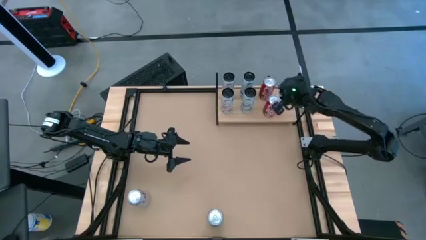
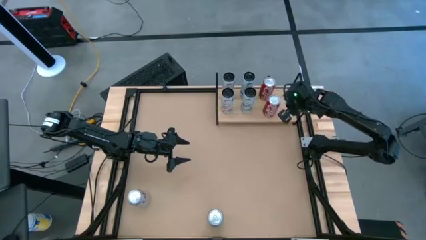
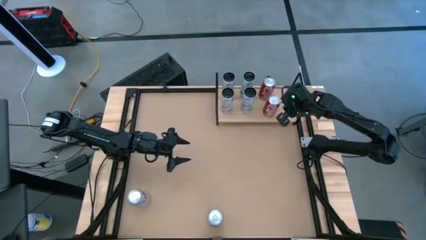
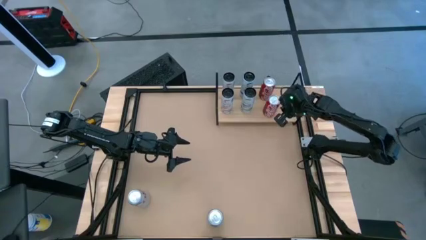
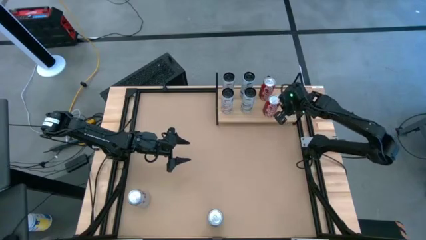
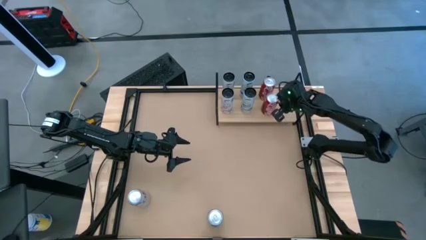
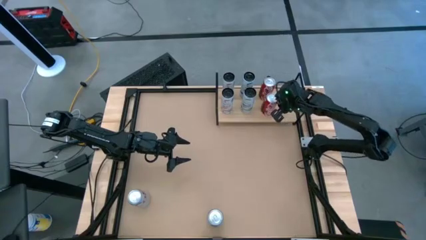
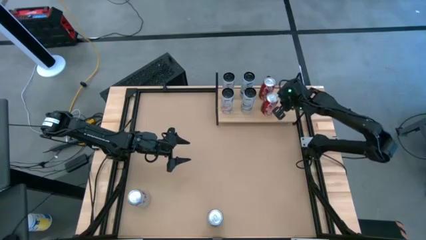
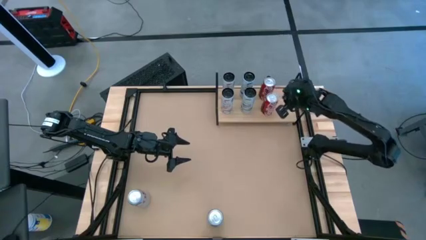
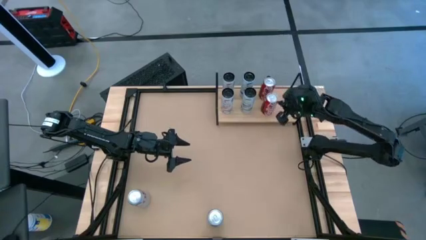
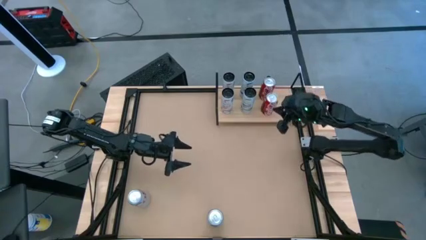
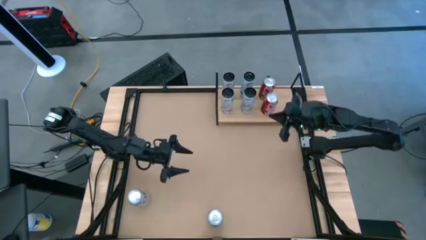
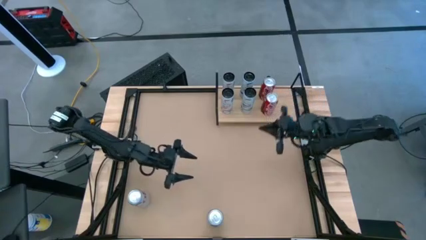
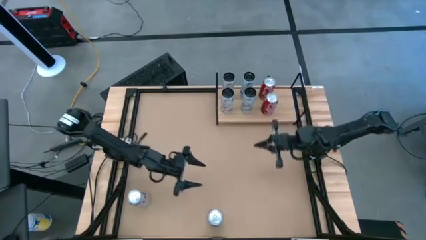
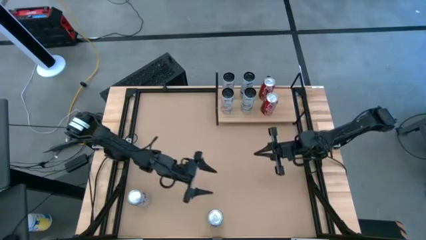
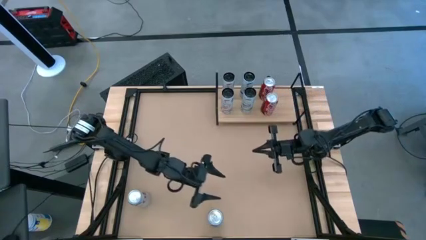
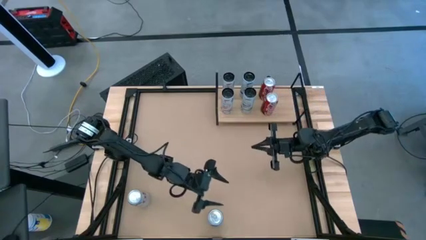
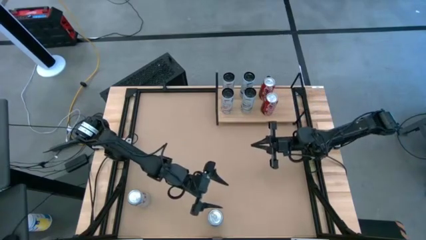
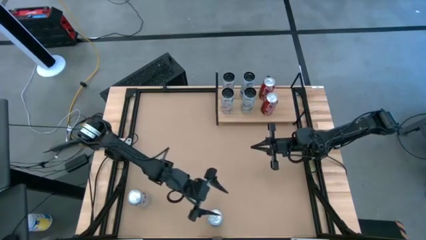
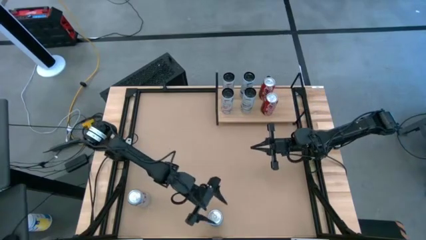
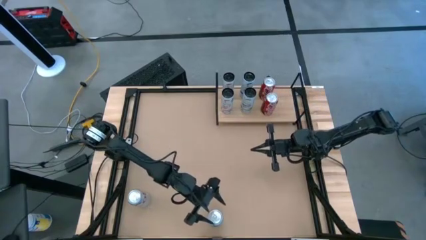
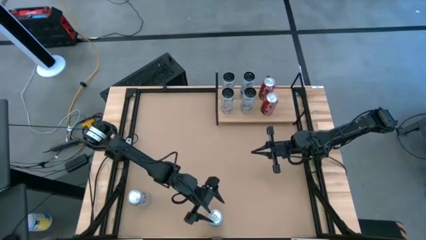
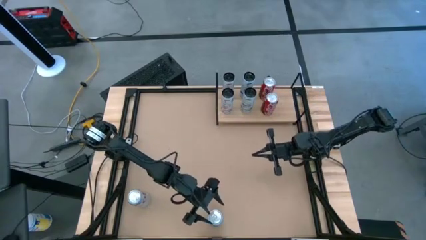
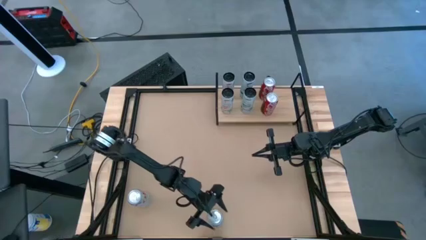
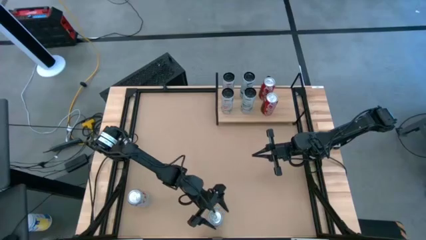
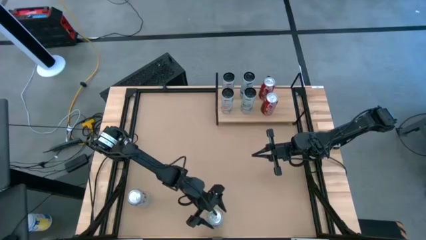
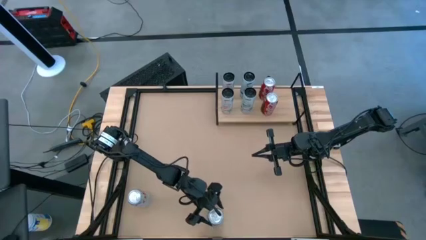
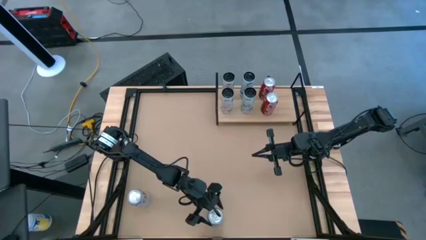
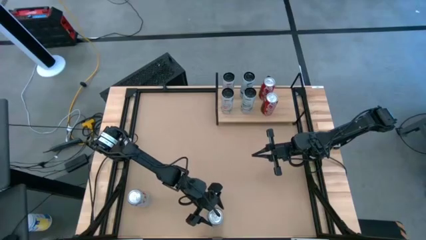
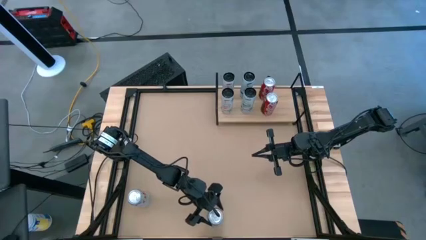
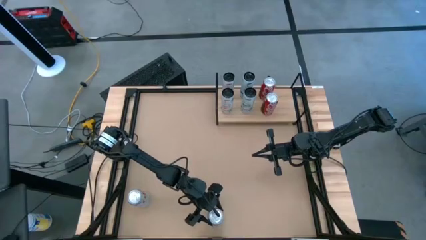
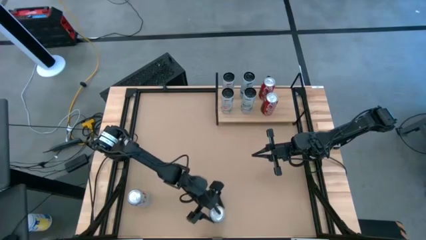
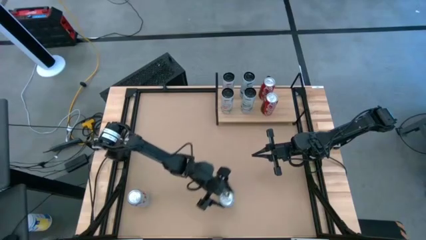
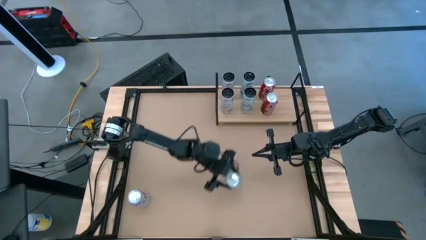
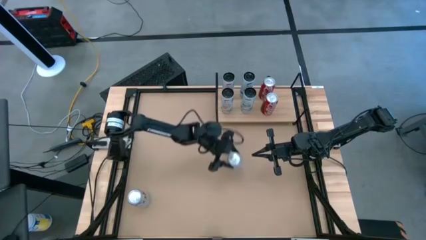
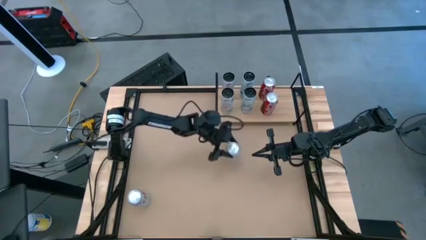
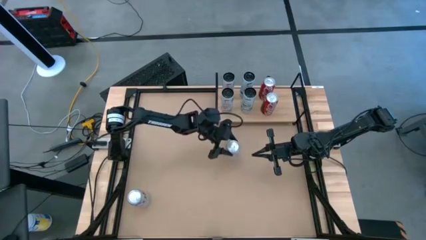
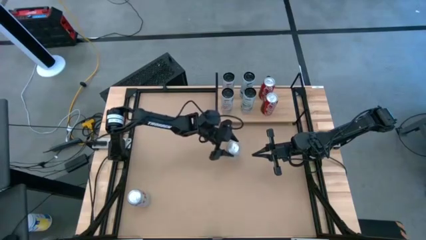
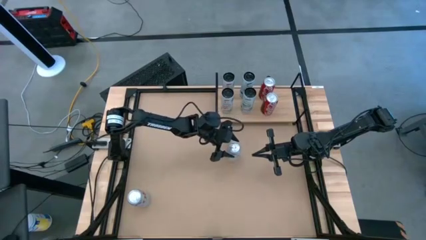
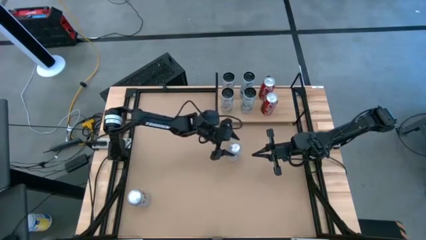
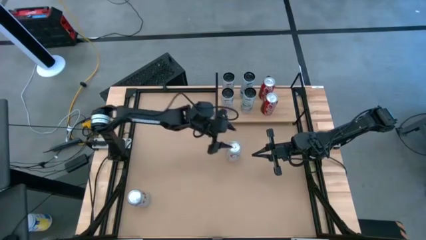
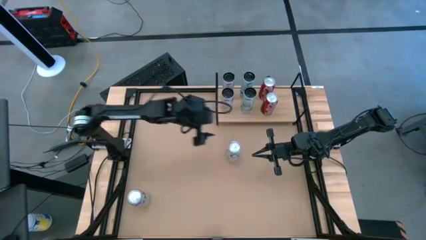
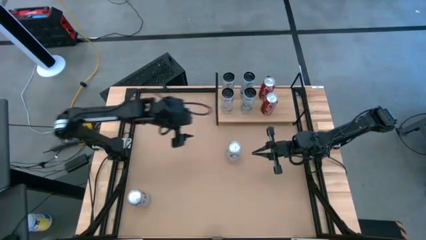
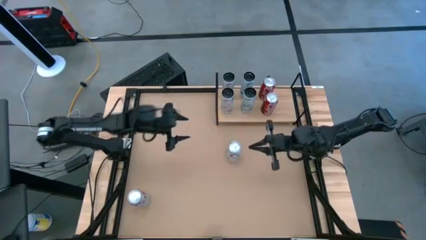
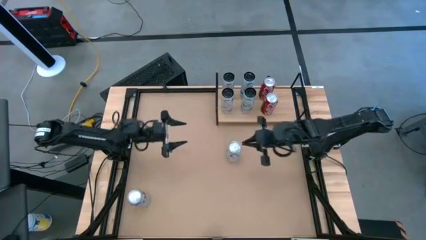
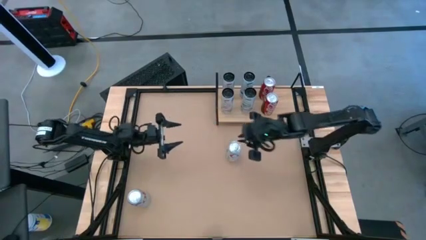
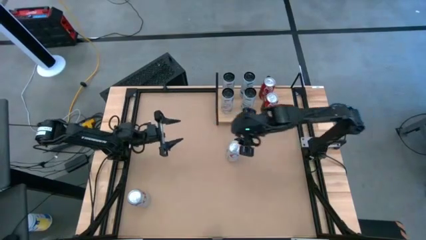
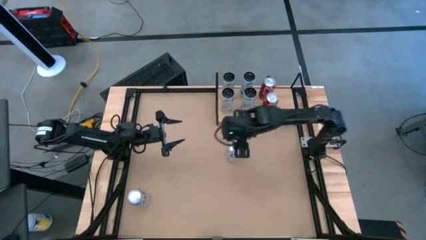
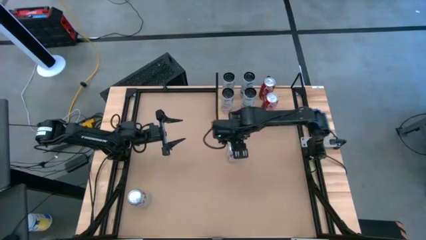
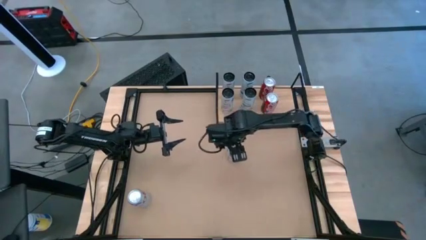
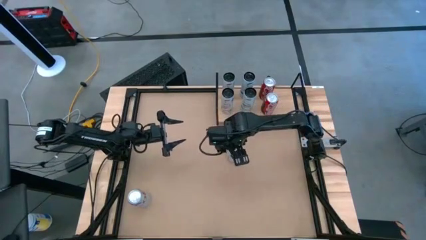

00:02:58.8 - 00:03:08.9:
Task: Place canned beverage on shelf
Put the bottom silver soda can on the shelf

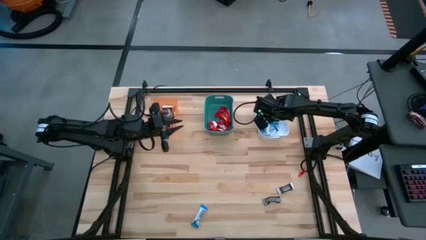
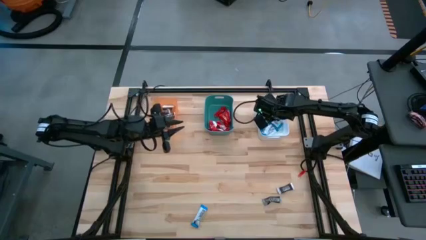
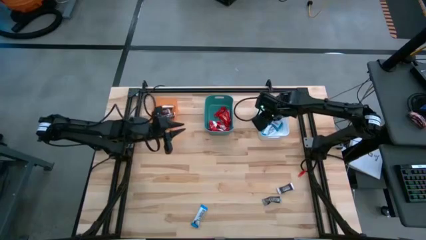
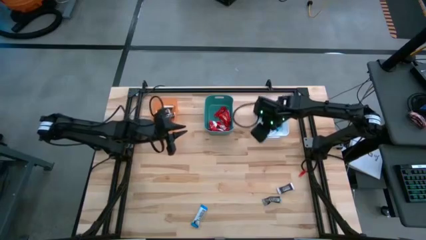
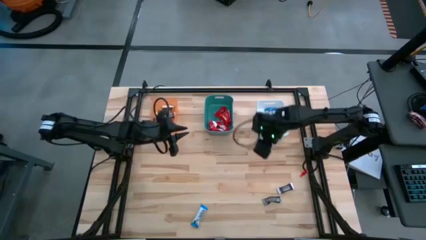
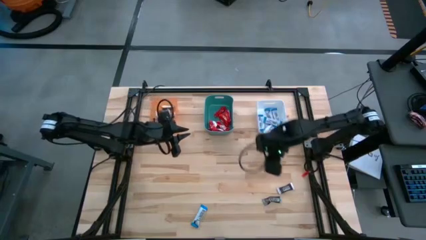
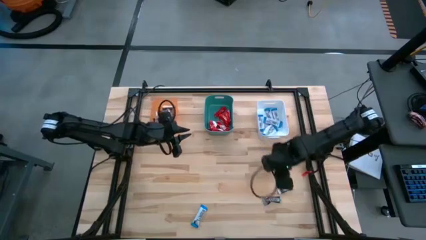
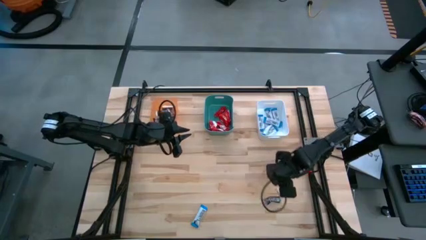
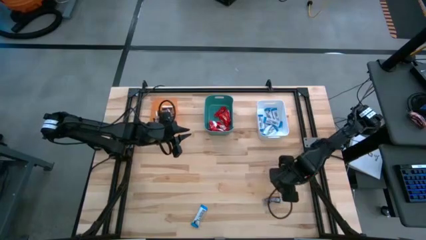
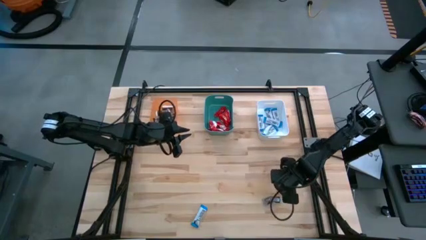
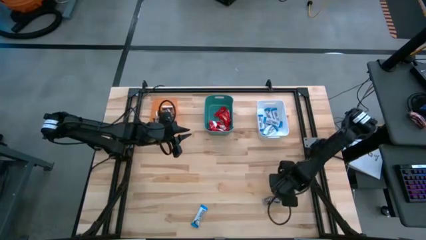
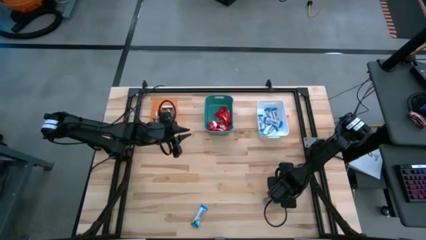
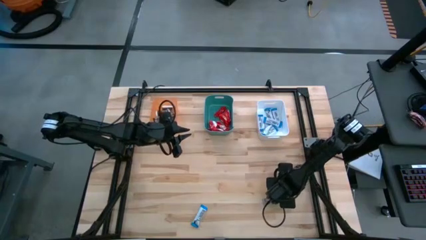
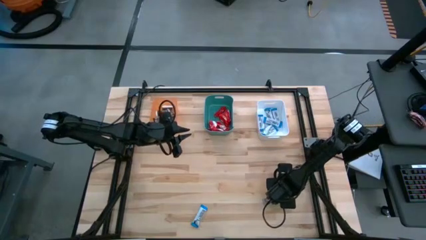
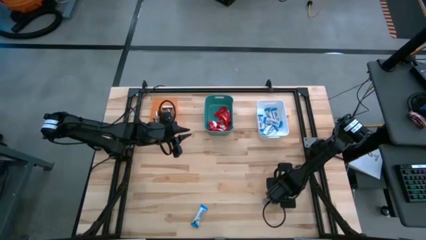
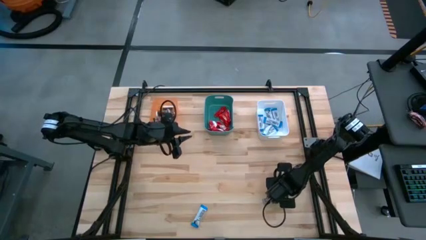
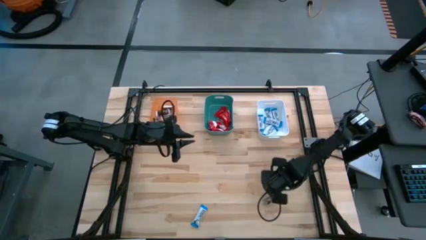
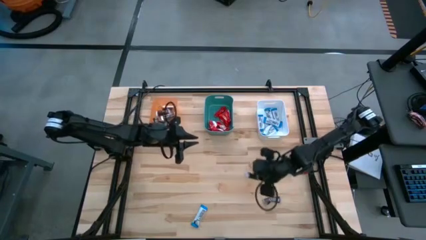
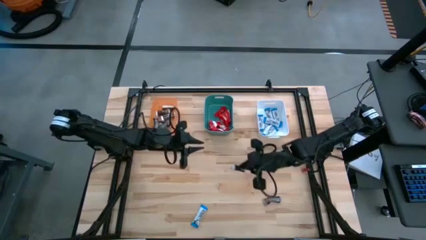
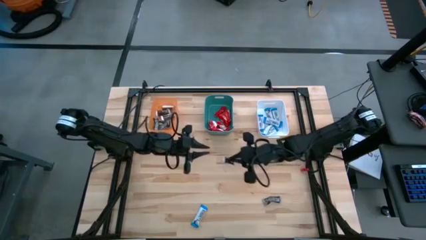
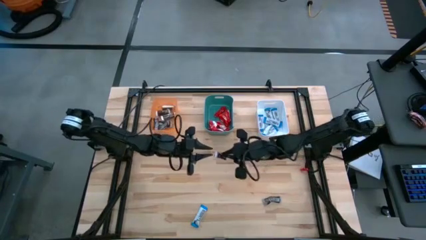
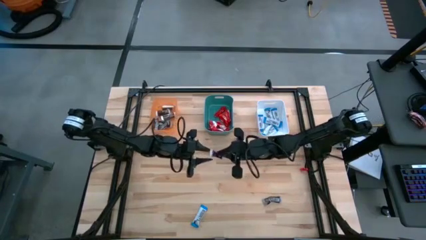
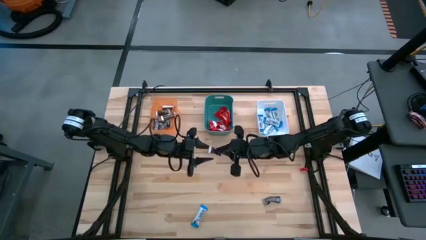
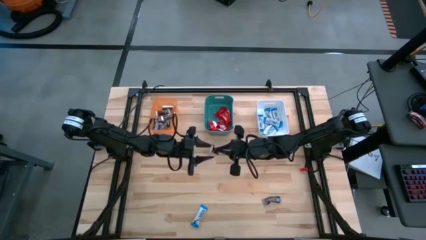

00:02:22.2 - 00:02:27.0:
Task: Organize candy in baskets
Put the black chocolate bar into the orange bin

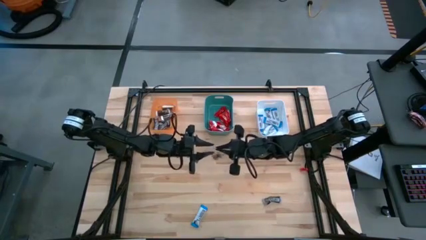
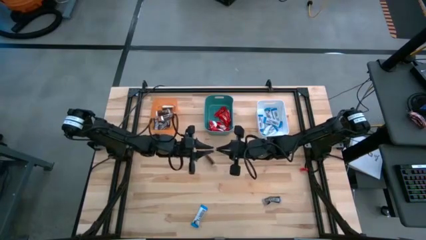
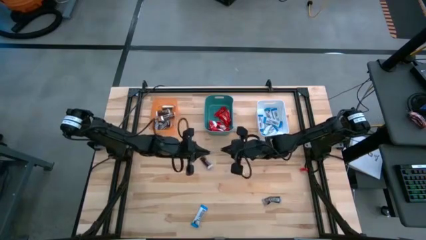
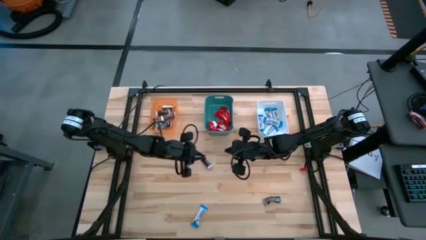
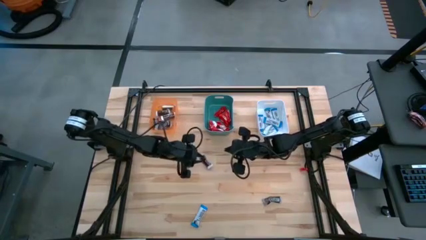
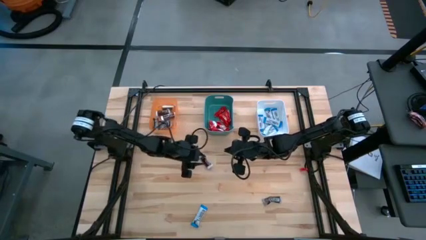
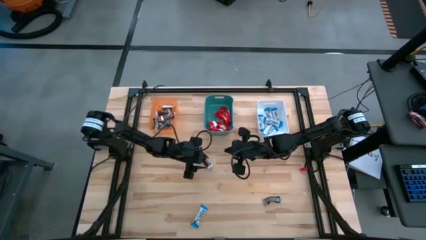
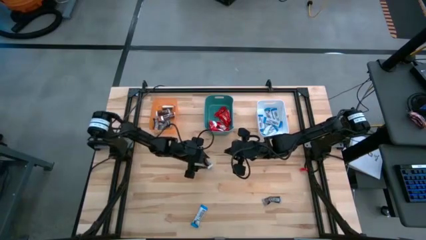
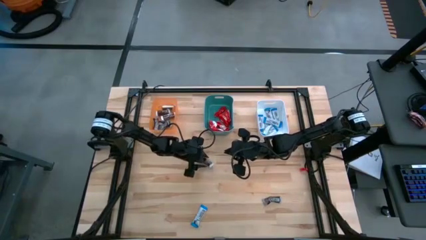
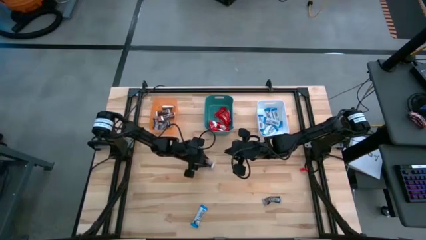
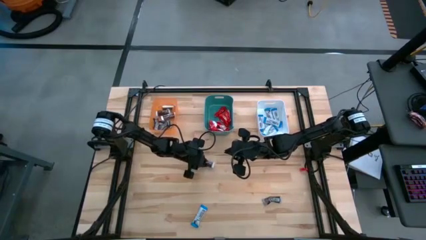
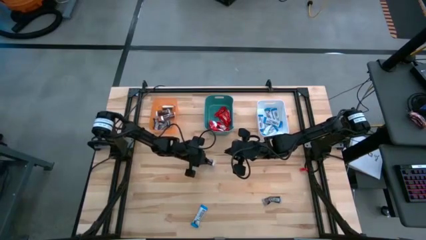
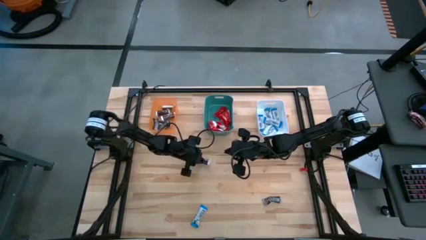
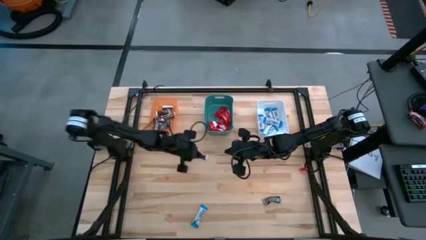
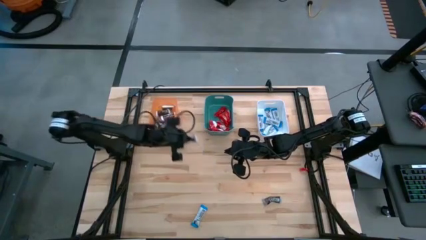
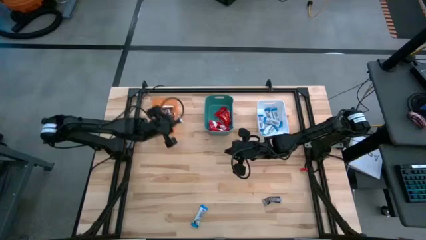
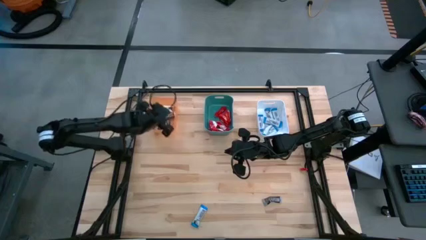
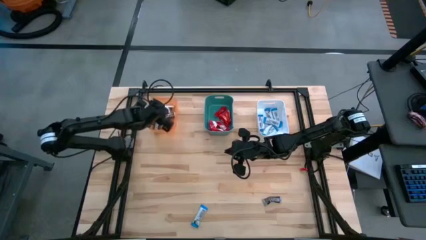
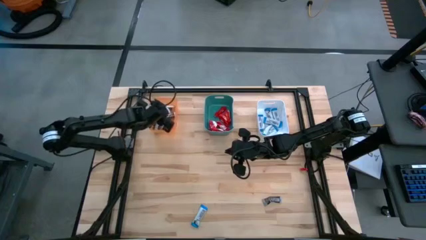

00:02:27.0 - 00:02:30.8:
Put the black chocolate bar into the orange bin
